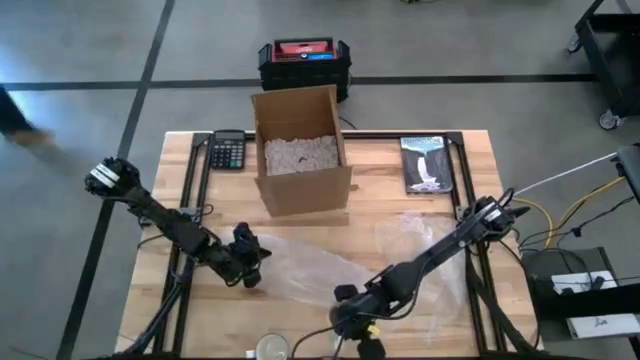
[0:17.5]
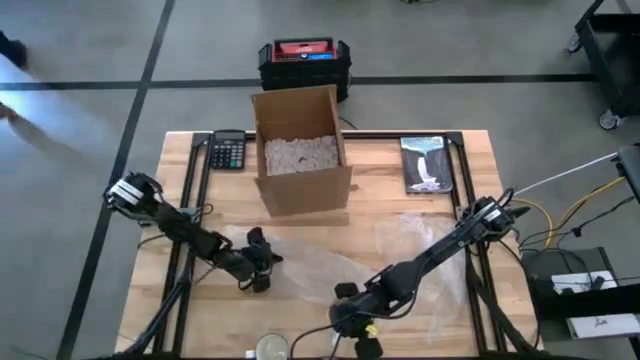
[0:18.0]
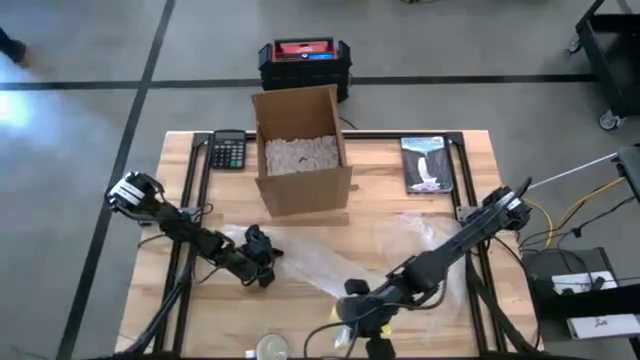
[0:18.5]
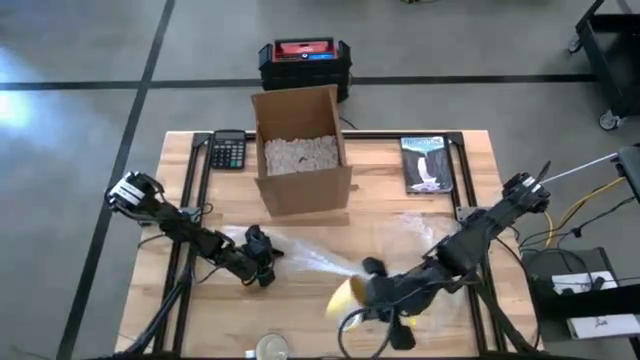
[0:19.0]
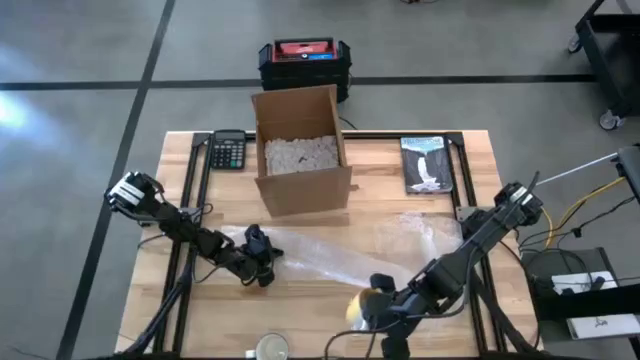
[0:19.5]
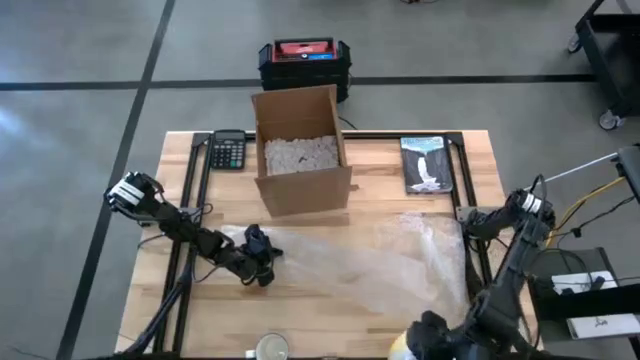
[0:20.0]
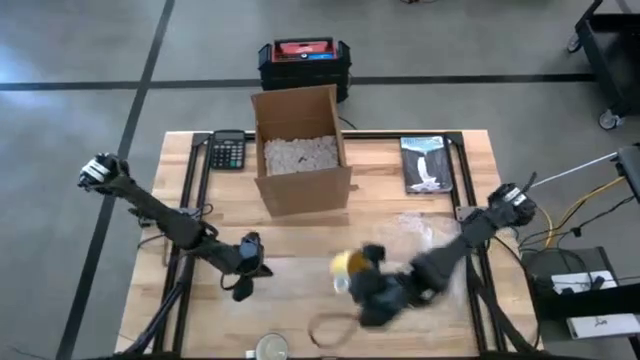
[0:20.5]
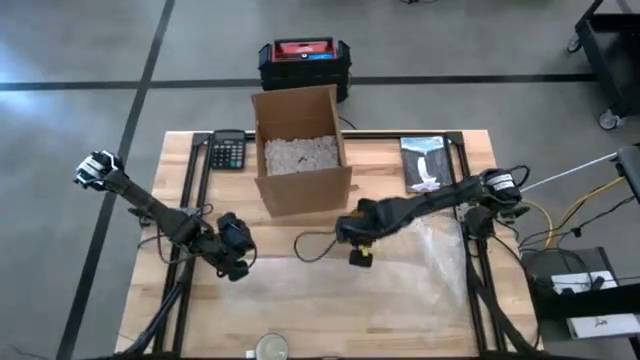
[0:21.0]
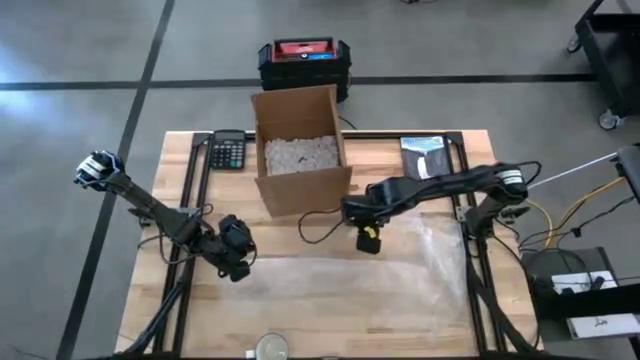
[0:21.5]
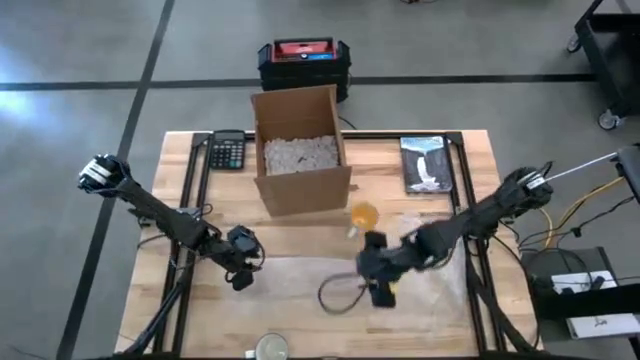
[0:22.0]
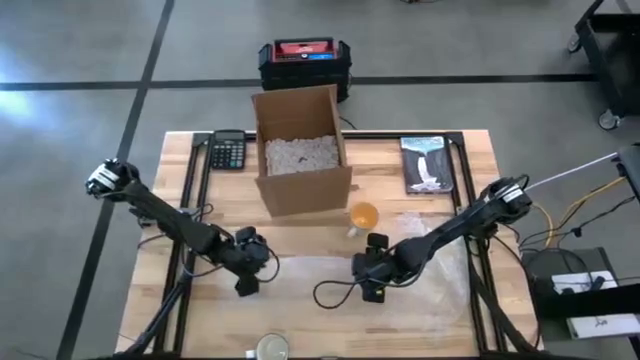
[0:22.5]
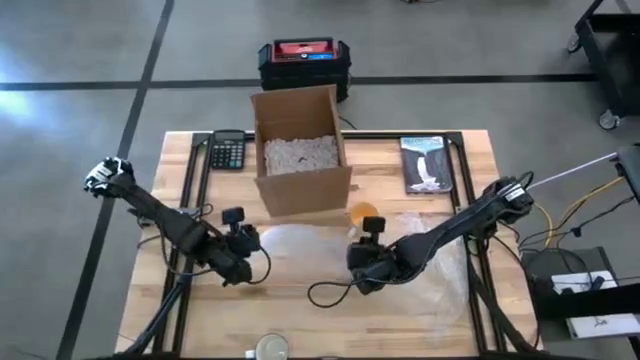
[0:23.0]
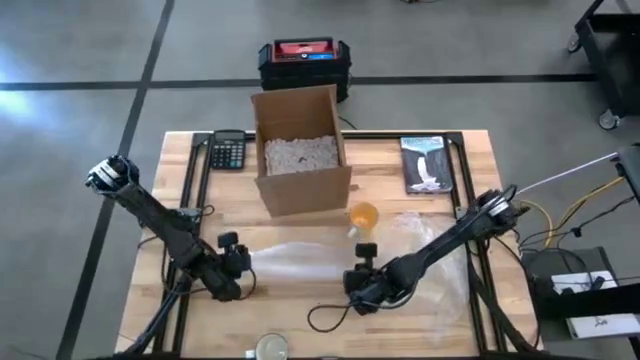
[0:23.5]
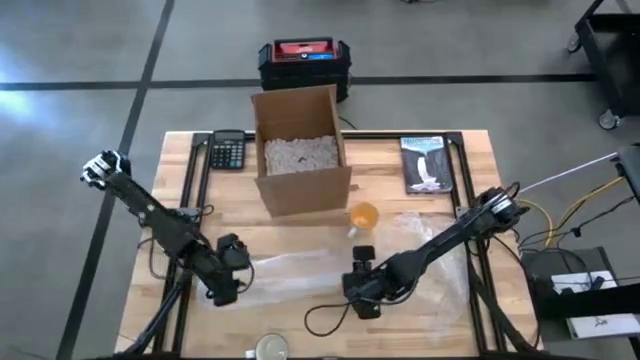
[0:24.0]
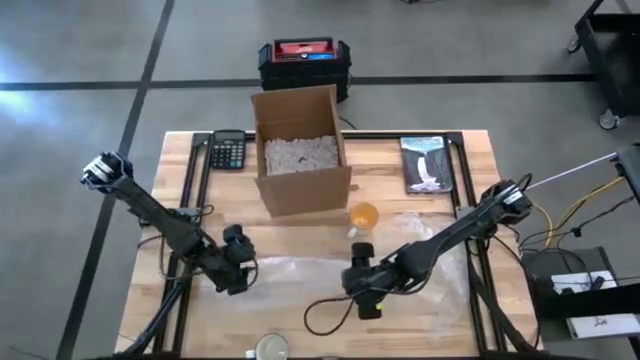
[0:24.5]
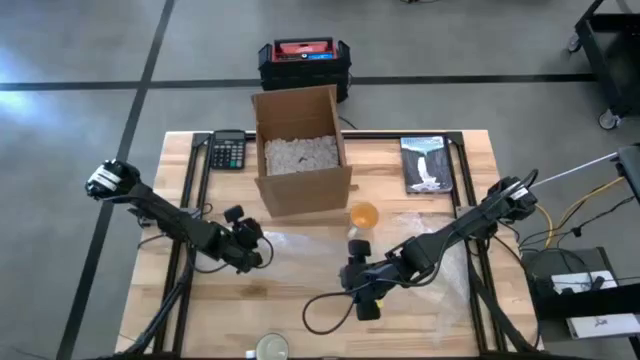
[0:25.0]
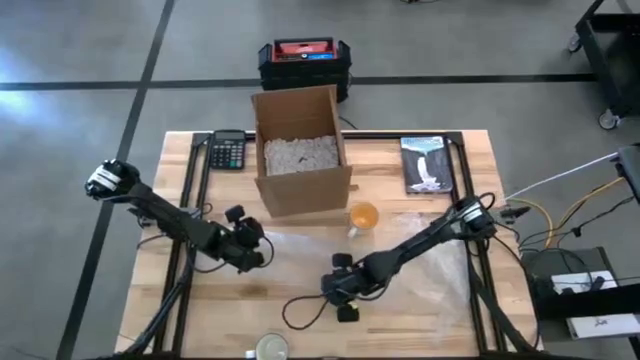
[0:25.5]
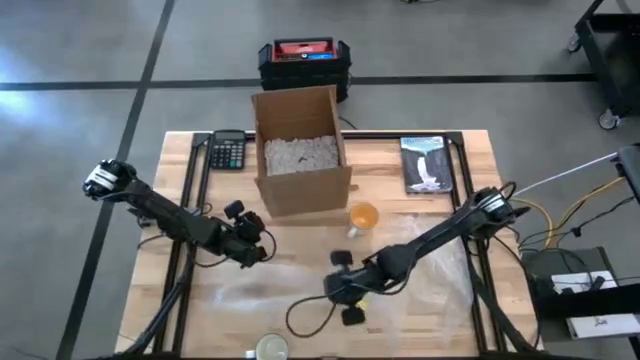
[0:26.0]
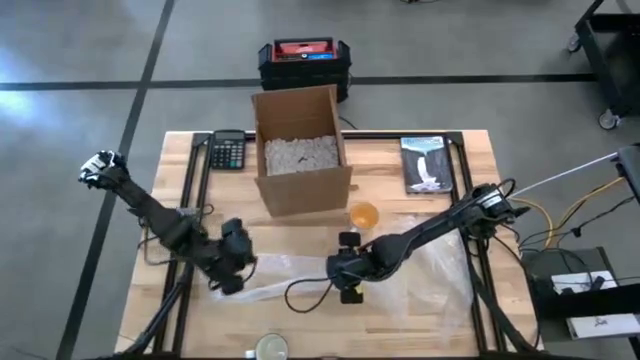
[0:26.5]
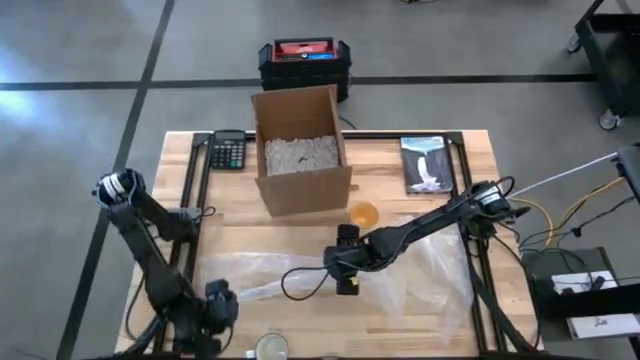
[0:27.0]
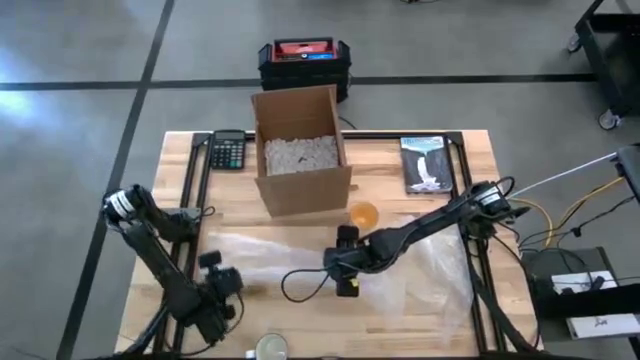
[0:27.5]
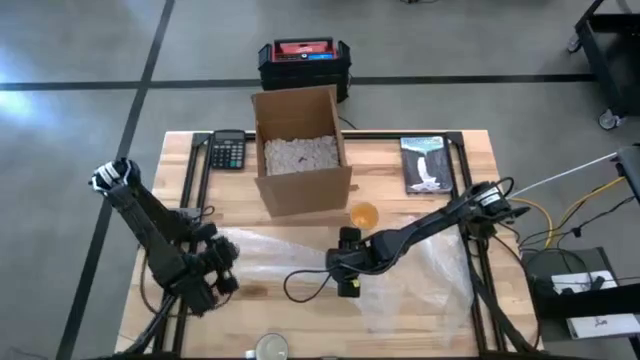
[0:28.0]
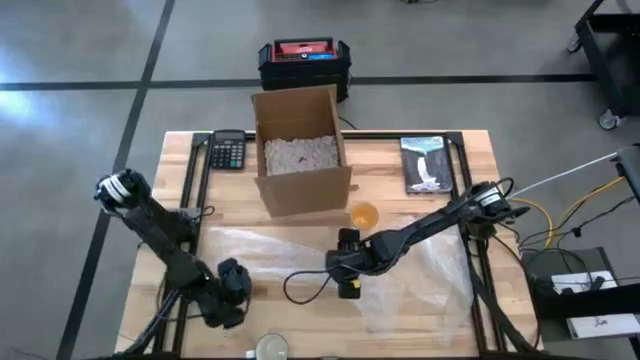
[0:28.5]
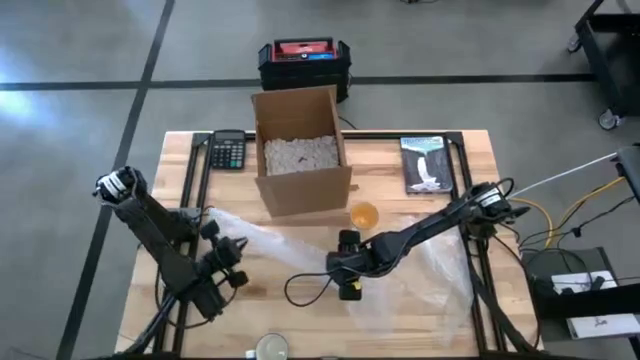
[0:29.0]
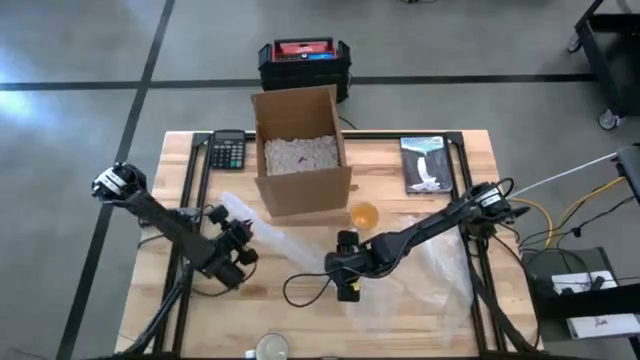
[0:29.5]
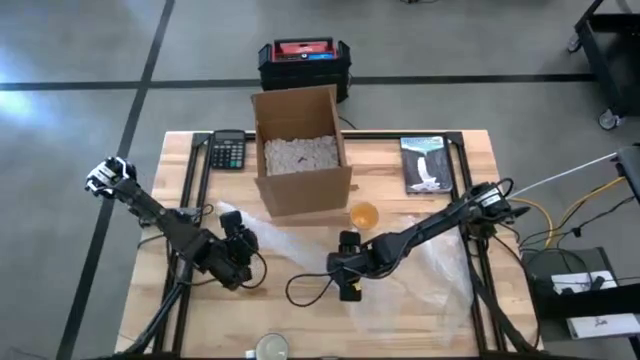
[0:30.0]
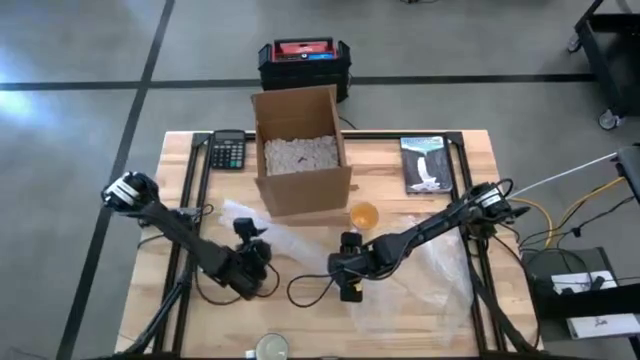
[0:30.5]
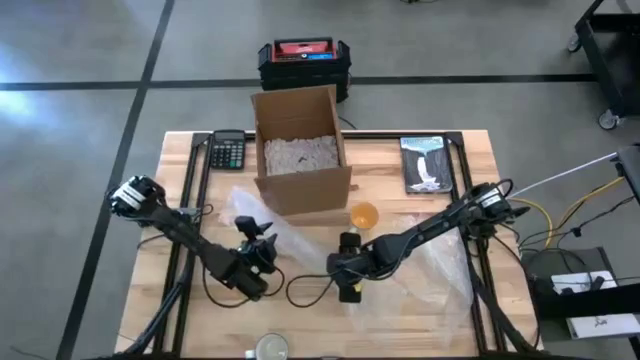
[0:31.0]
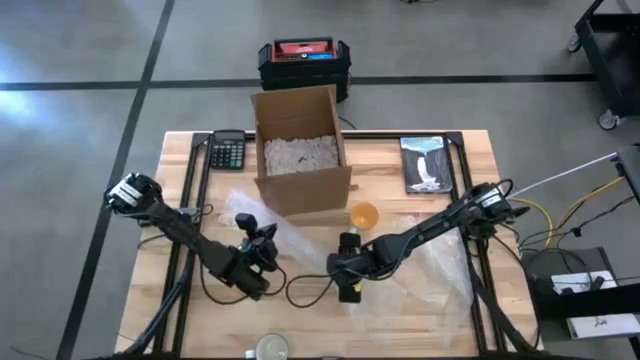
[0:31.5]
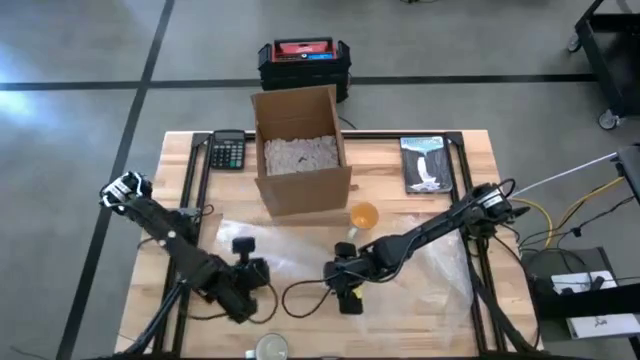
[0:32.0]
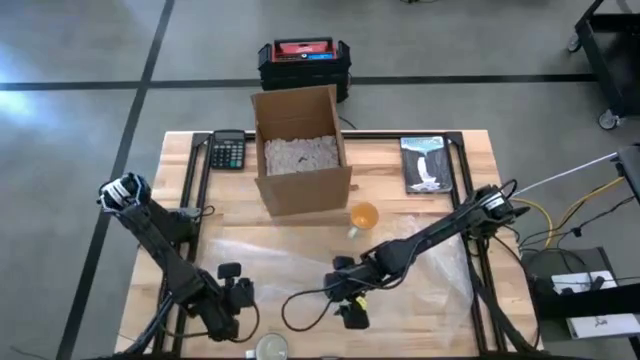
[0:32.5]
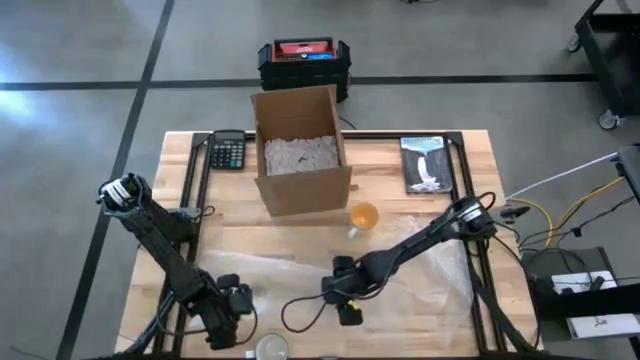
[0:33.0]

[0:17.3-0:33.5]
Task: wrap mug
Prepare the transparent bubble wrap

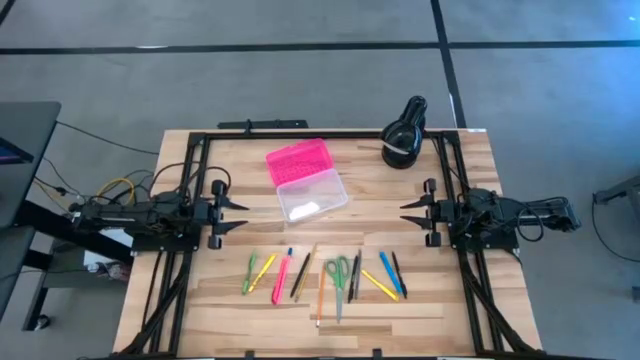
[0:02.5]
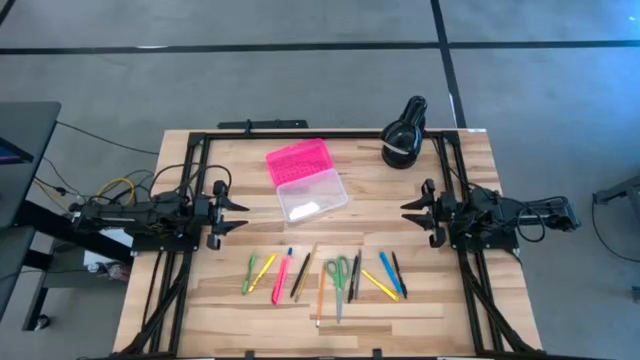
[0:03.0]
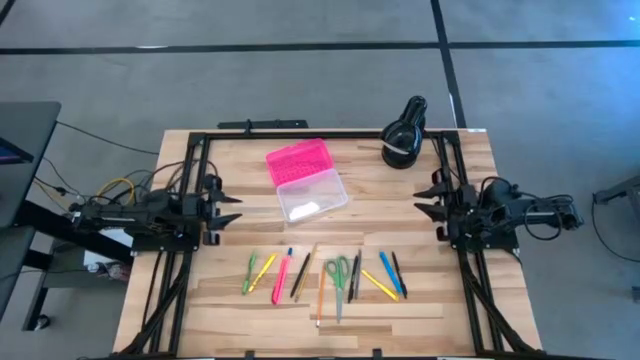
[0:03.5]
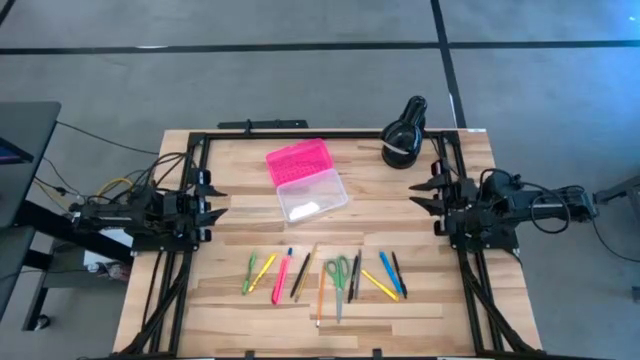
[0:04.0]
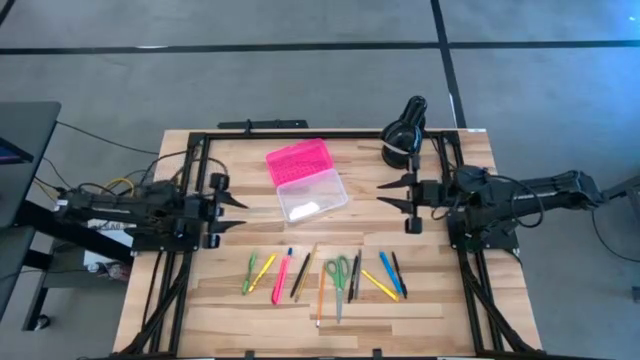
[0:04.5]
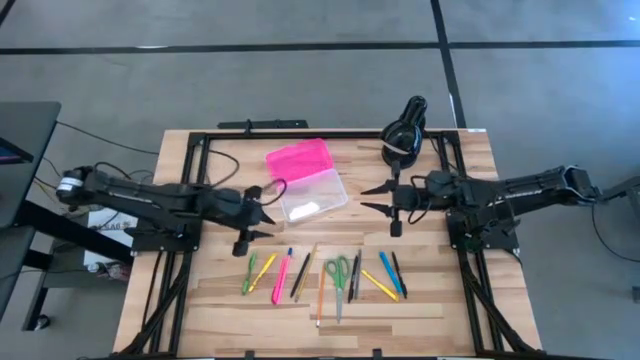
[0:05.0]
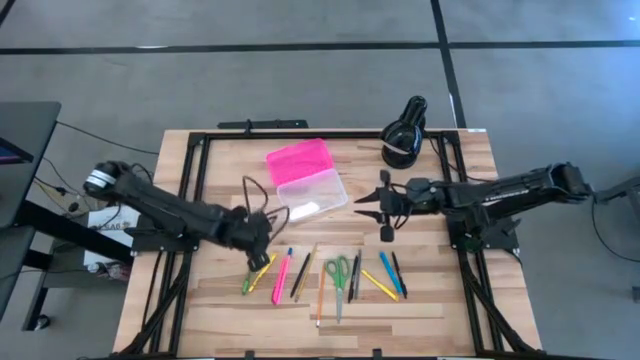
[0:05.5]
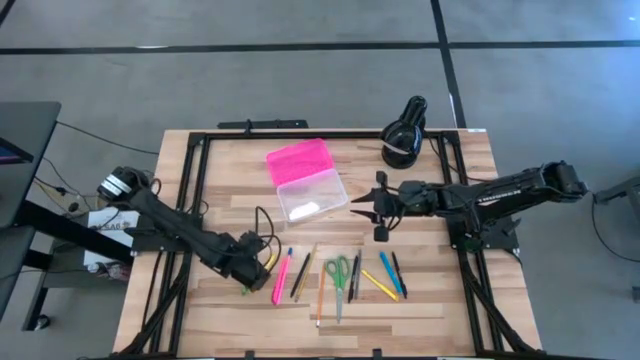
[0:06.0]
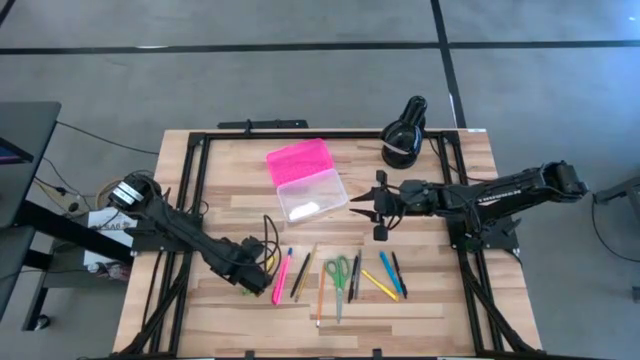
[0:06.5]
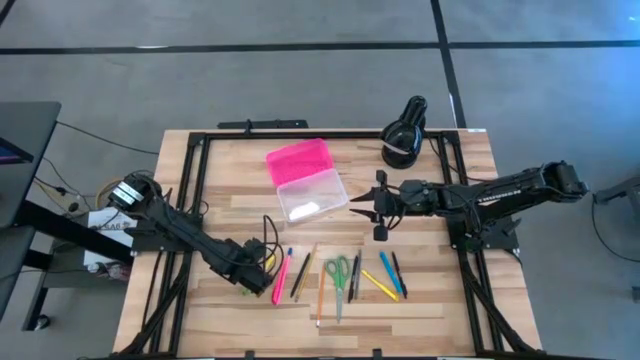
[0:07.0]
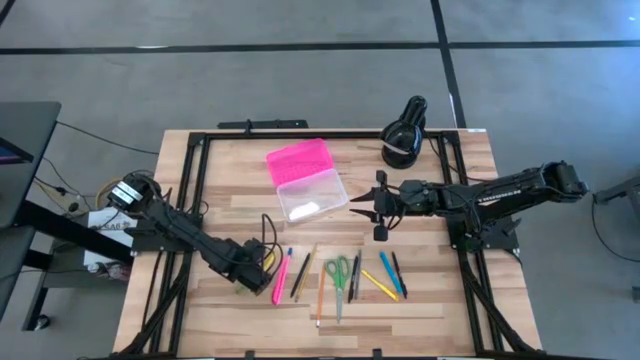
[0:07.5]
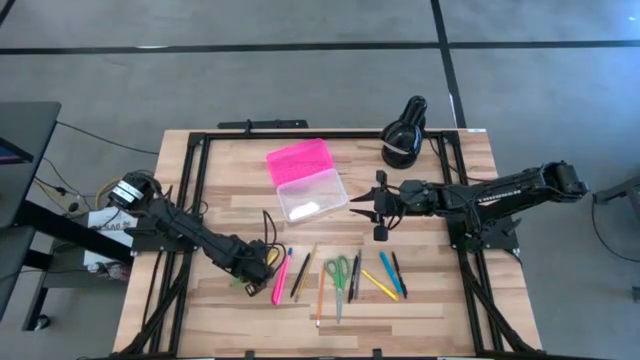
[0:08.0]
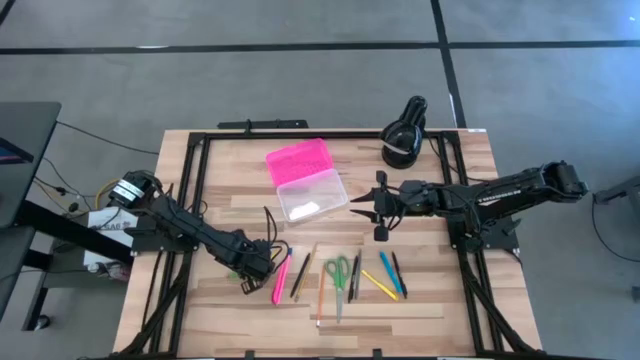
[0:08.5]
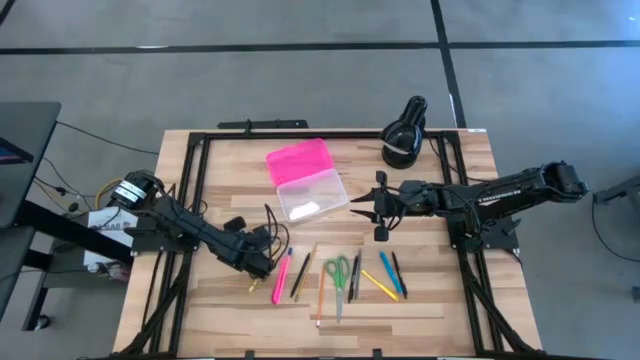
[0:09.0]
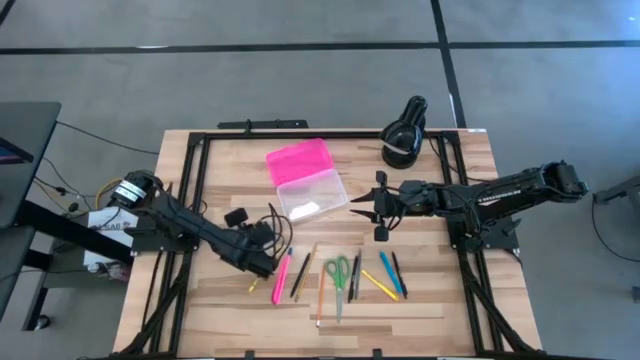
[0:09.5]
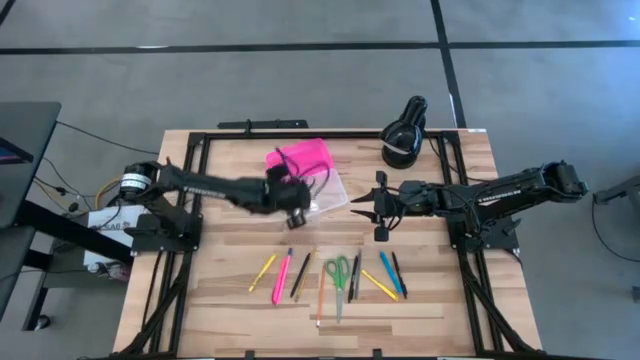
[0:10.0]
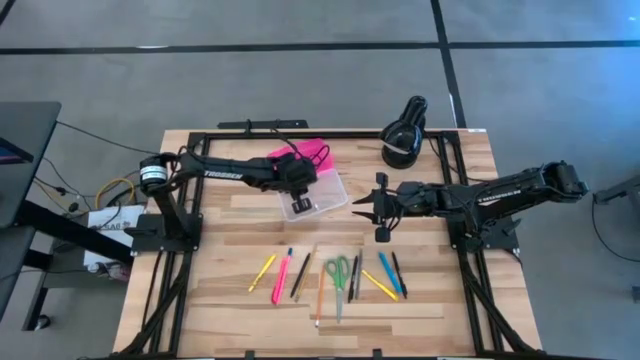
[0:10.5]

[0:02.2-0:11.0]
Task: Pick & place school supplies into a supply box
Put the green pen into the pink supply box
